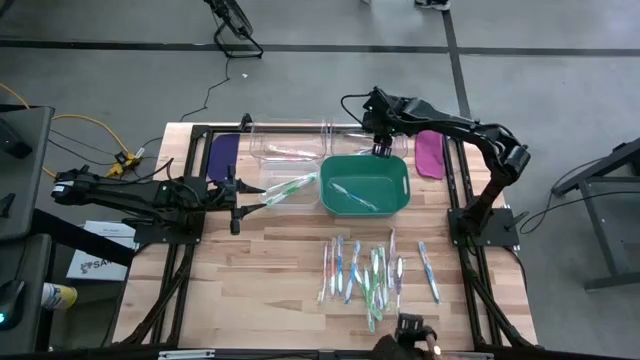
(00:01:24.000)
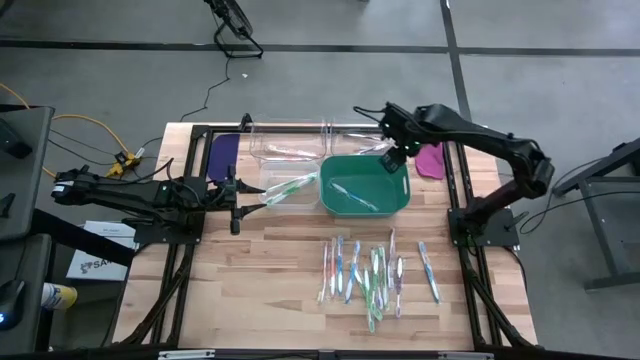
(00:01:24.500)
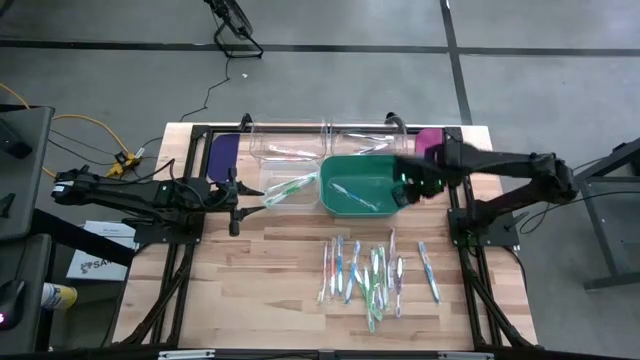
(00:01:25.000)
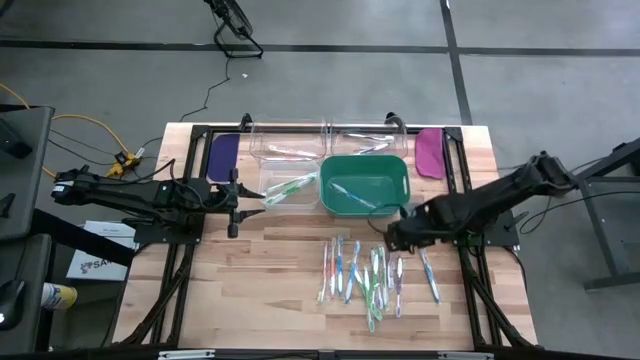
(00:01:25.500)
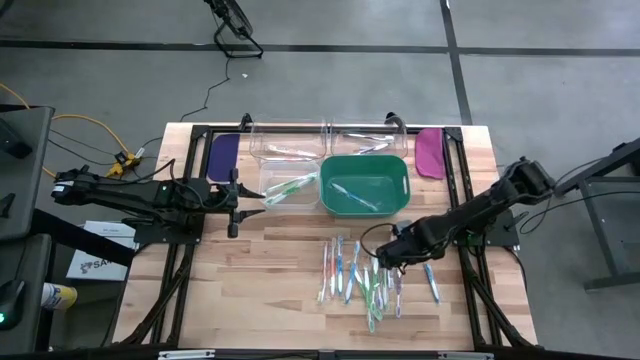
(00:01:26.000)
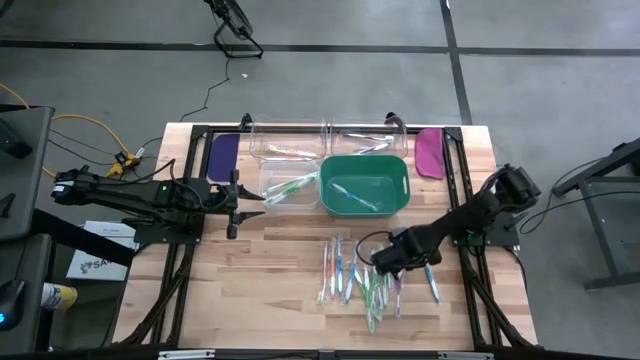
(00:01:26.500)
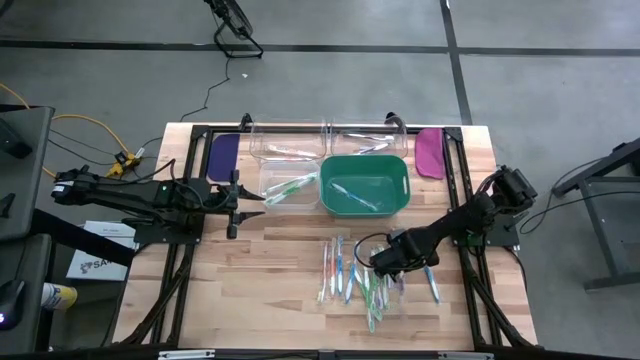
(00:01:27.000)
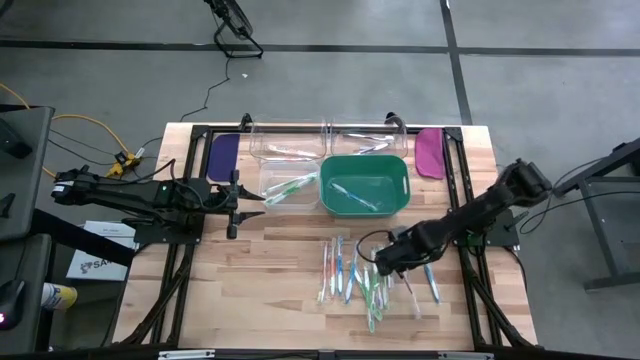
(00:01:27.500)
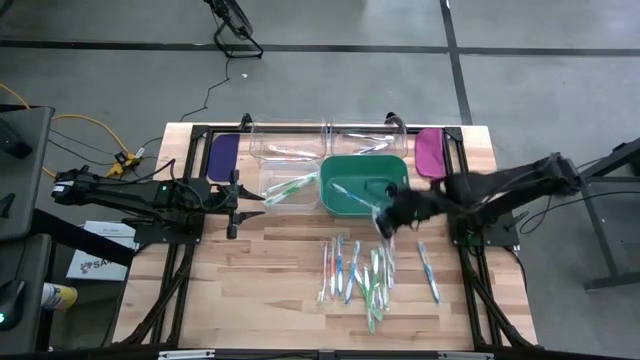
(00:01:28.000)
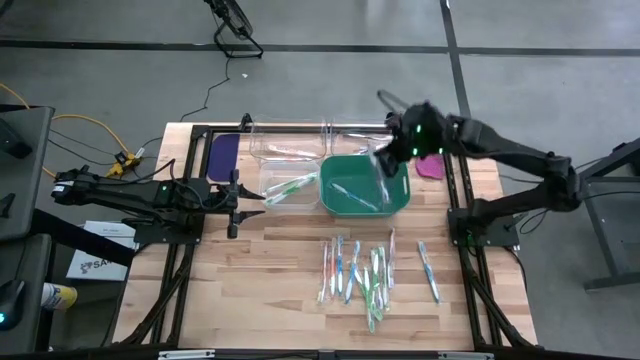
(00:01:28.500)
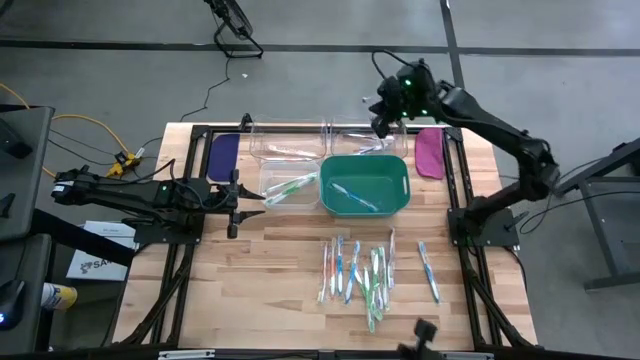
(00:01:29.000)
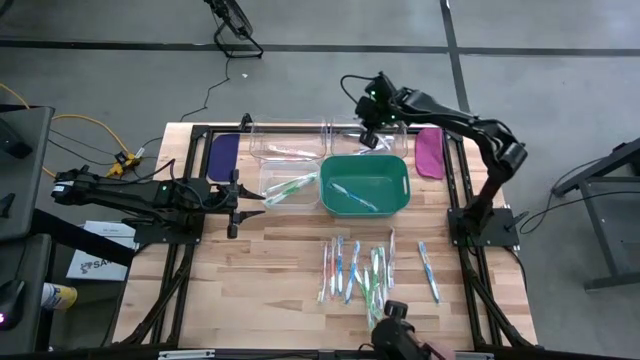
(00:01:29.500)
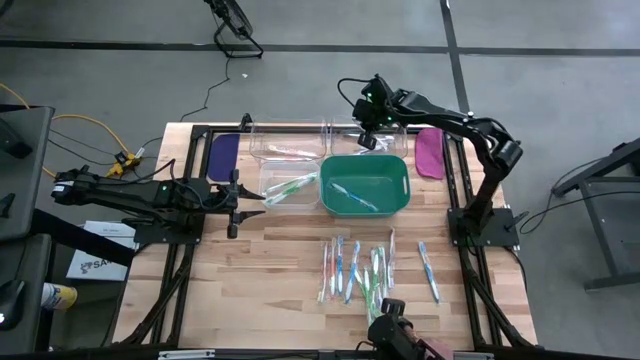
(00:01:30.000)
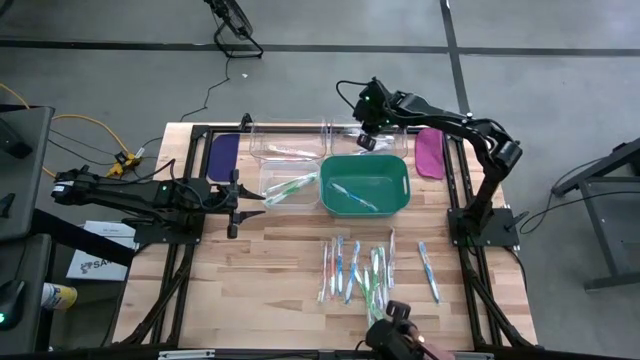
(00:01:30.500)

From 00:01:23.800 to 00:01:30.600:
Task: Pick & Place Toothbrushes
Put the purple toothbrush into the right transparent bin

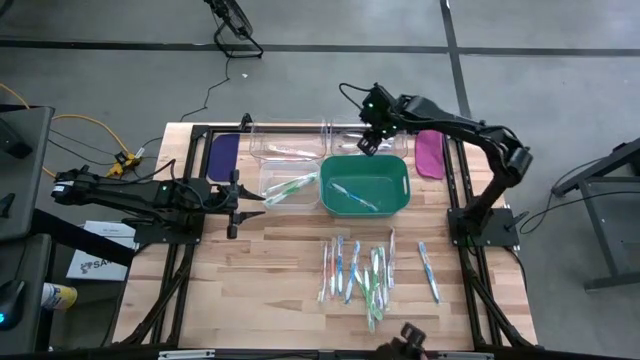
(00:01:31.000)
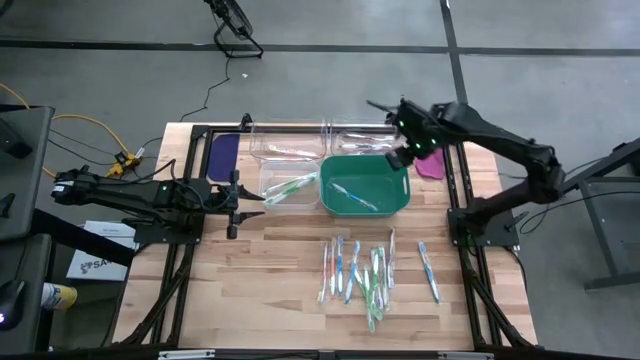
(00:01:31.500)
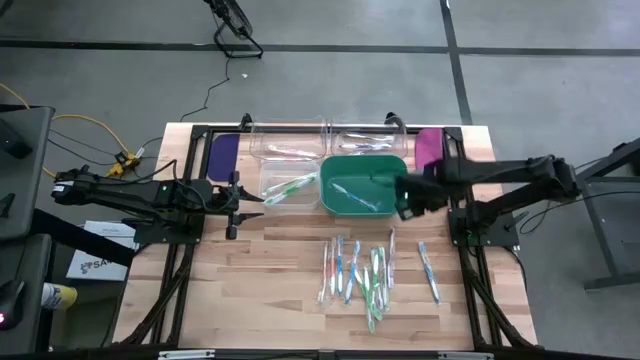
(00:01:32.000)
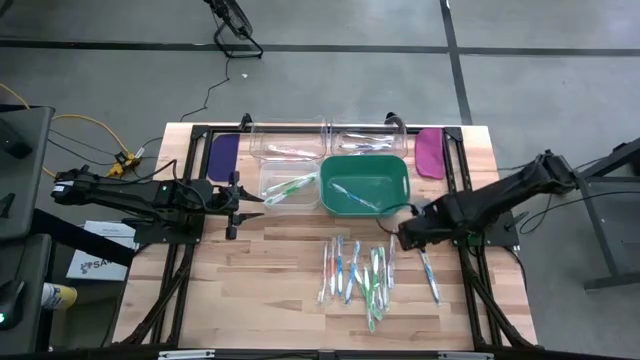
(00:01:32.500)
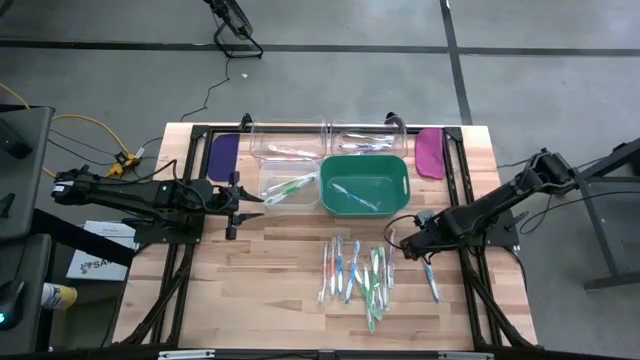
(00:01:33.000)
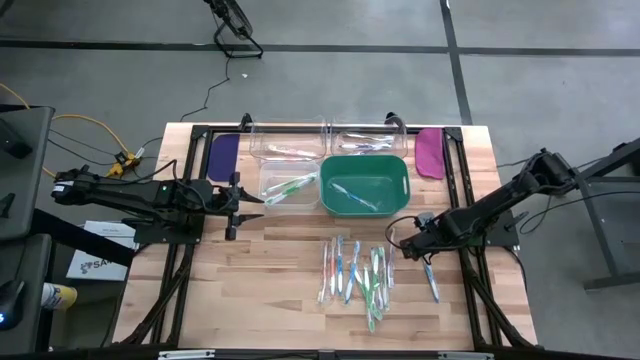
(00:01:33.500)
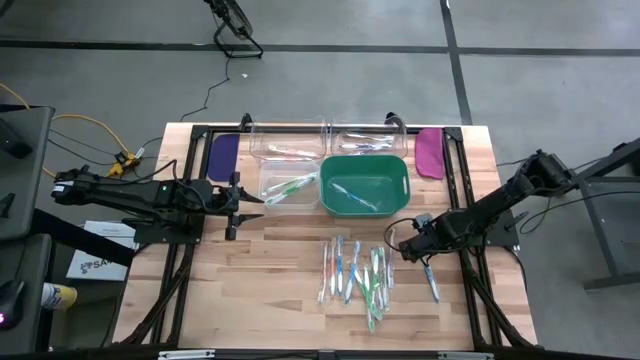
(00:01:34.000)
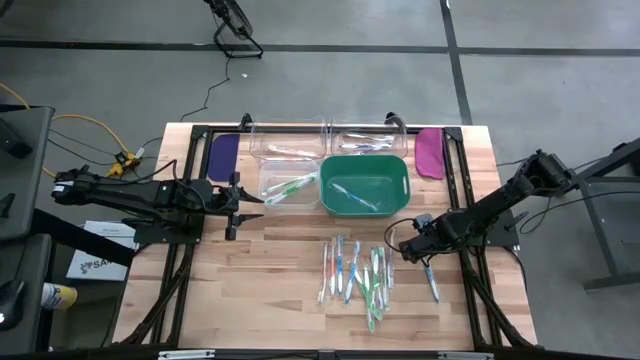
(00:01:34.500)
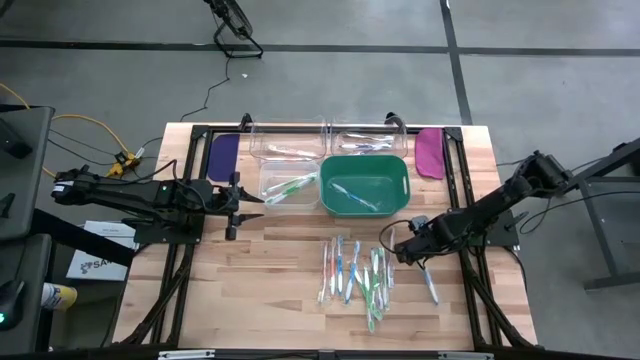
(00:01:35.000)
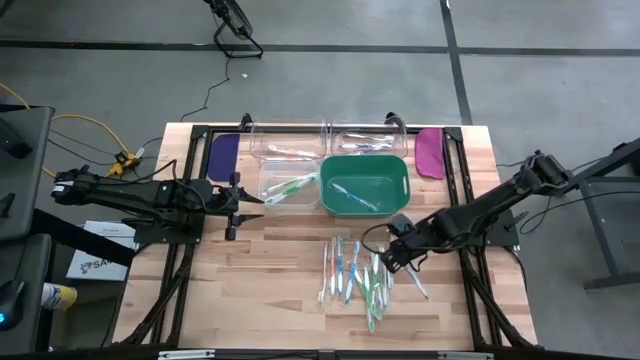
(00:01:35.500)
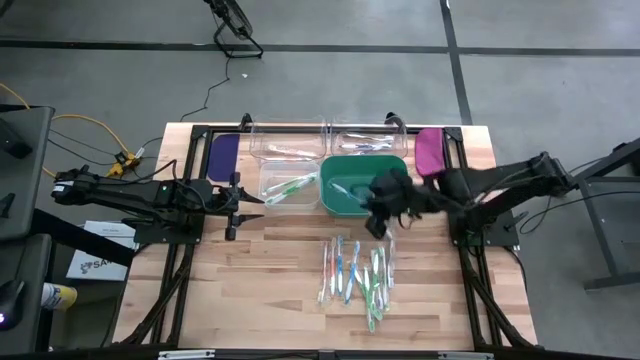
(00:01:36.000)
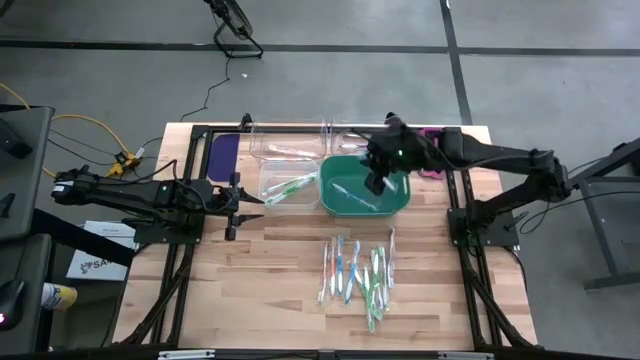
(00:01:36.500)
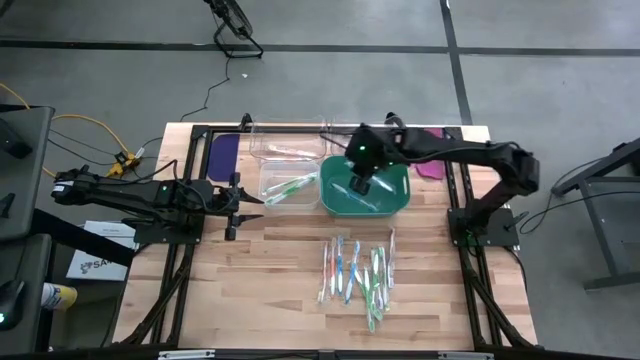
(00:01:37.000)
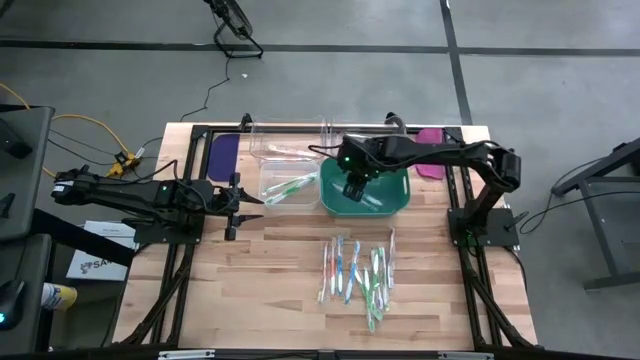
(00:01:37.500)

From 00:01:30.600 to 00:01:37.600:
Put the blue toothbrush into the green bin

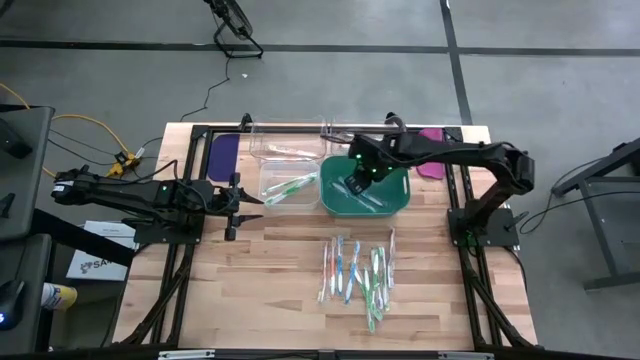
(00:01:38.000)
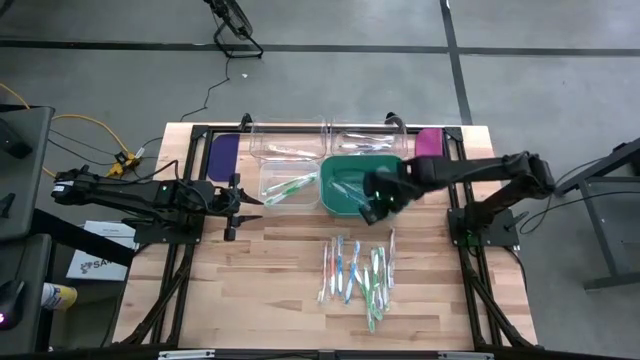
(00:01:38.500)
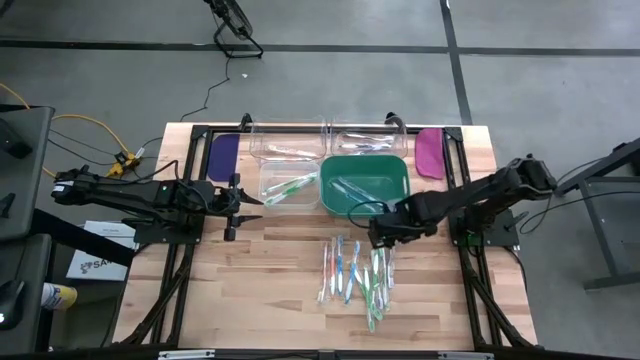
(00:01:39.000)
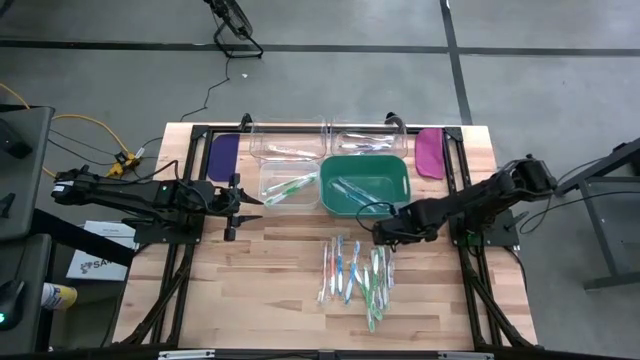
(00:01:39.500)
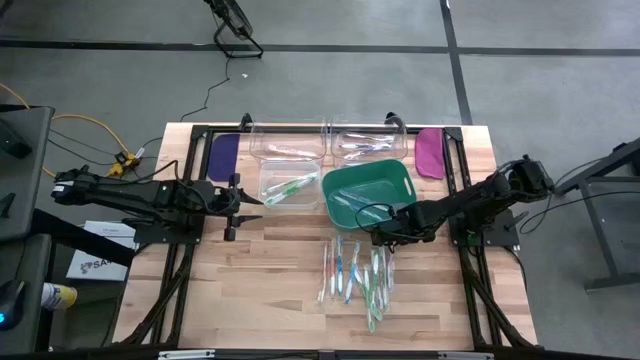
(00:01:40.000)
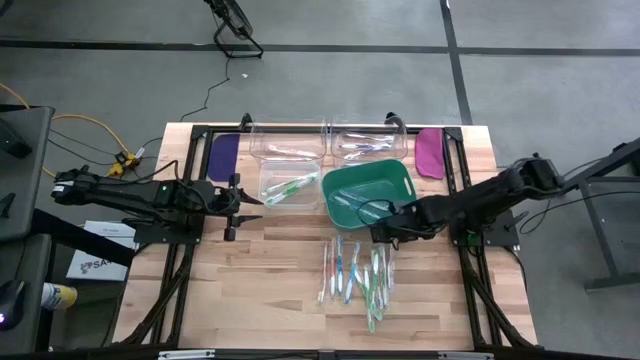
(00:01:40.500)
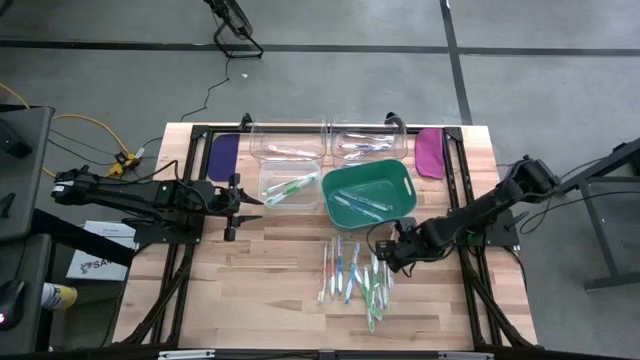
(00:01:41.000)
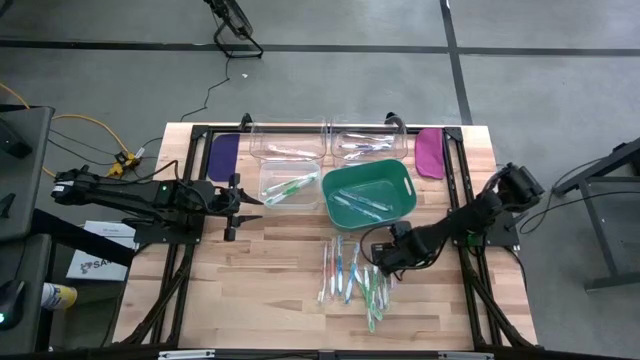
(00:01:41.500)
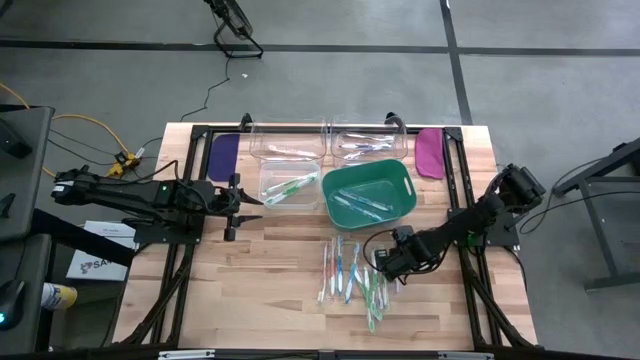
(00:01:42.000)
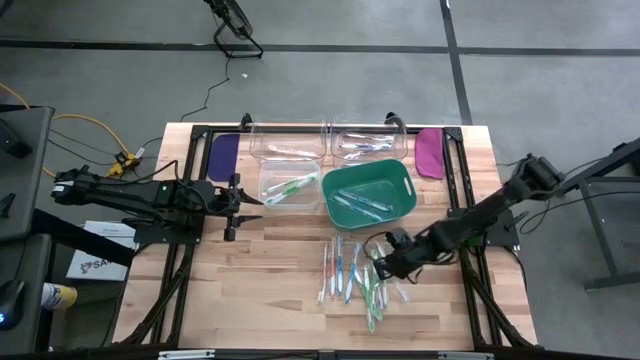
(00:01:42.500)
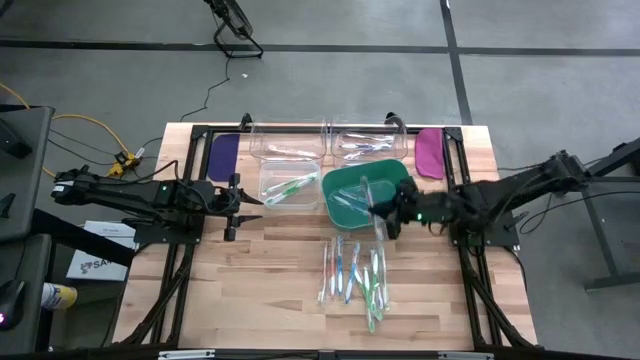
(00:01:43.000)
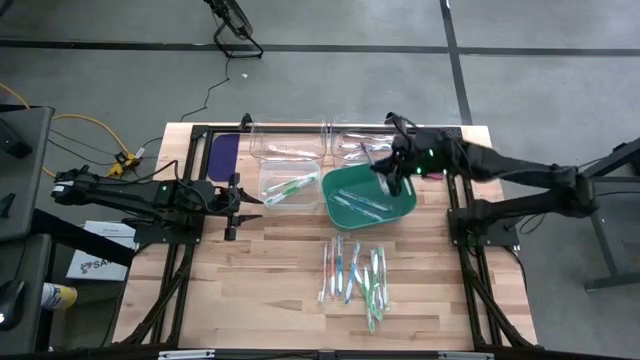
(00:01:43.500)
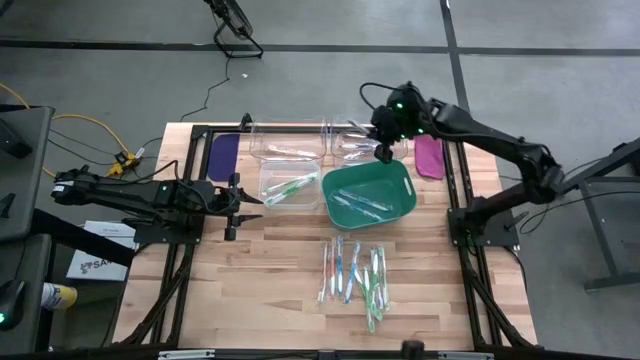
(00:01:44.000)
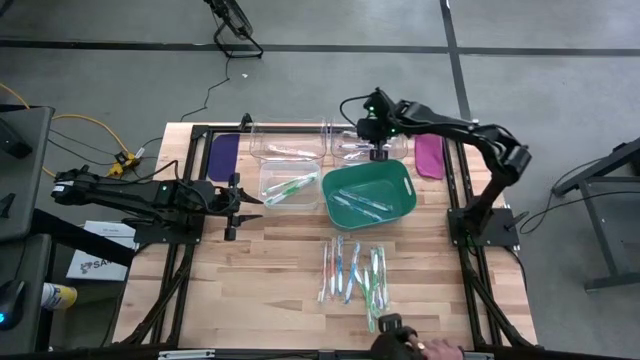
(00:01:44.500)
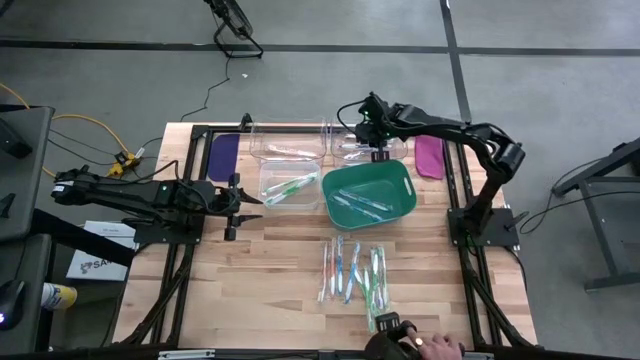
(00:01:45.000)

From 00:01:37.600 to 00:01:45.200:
Put the purple toothbrush into the right transparent bin
